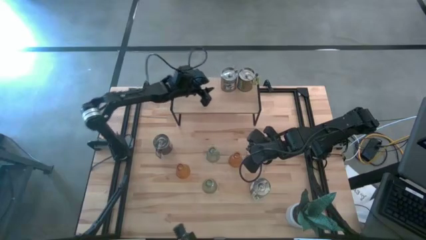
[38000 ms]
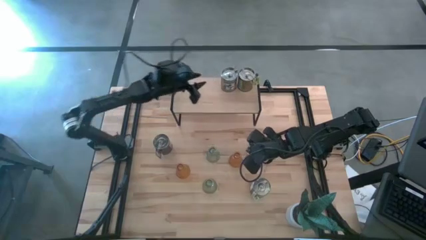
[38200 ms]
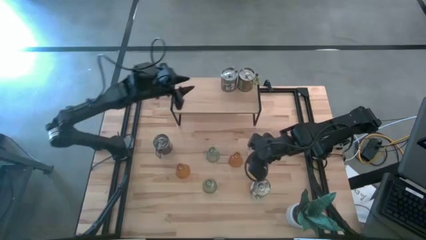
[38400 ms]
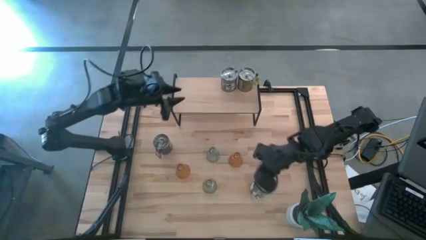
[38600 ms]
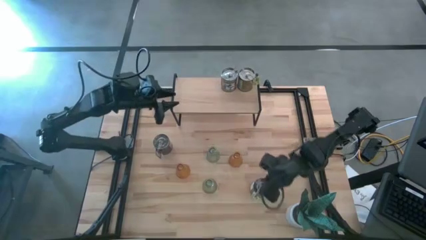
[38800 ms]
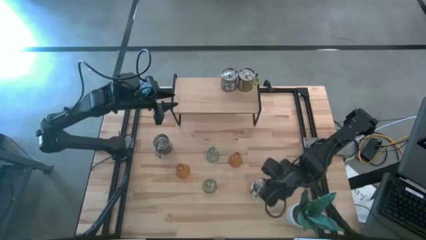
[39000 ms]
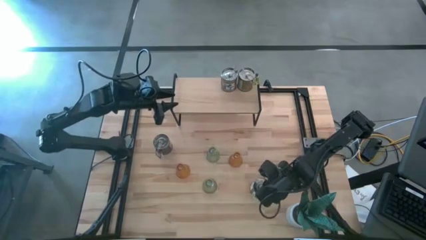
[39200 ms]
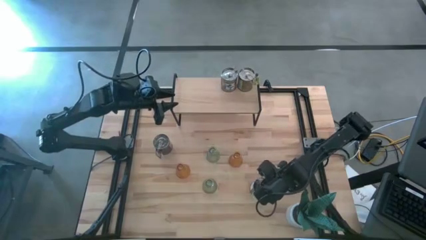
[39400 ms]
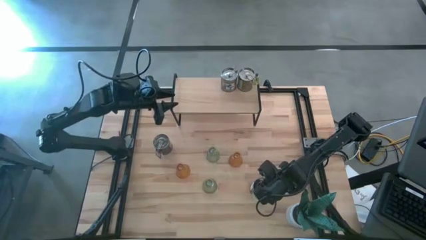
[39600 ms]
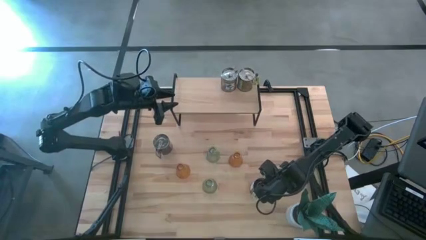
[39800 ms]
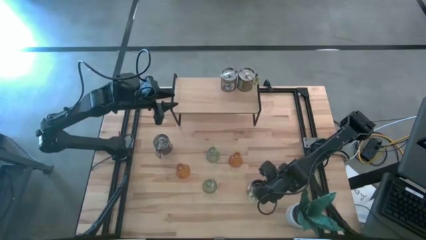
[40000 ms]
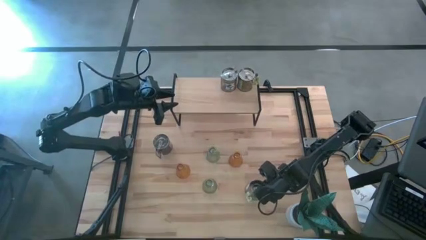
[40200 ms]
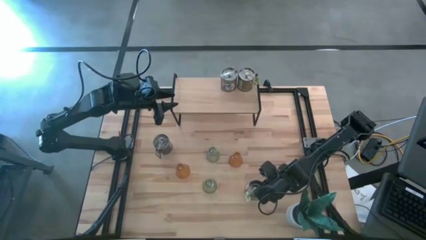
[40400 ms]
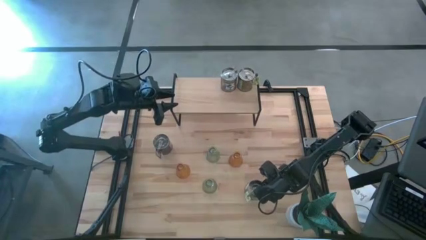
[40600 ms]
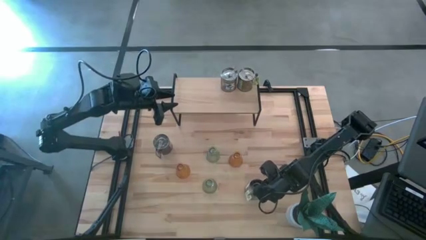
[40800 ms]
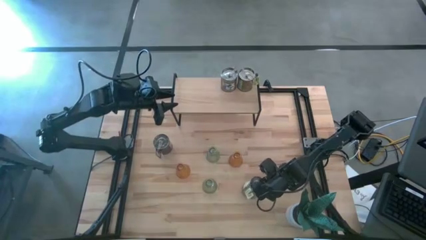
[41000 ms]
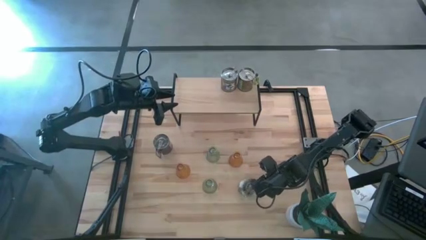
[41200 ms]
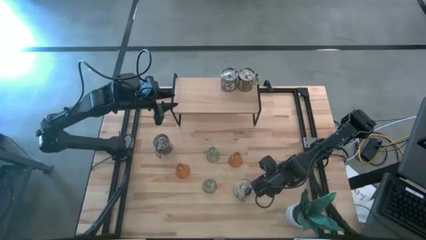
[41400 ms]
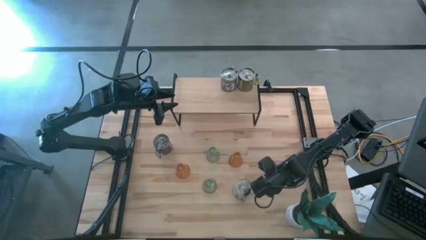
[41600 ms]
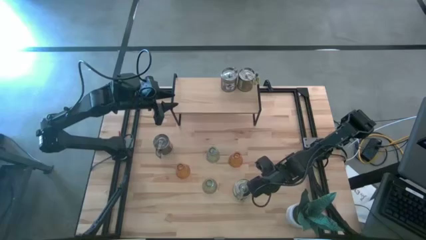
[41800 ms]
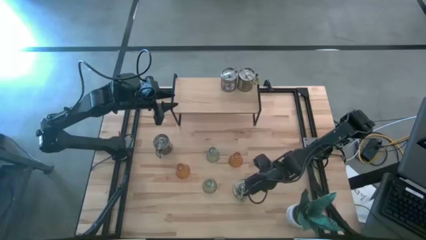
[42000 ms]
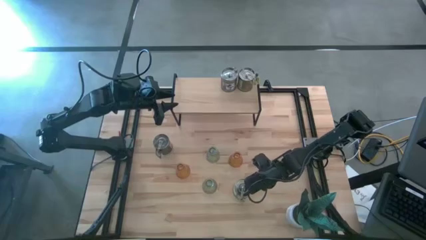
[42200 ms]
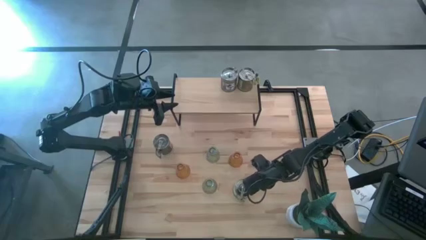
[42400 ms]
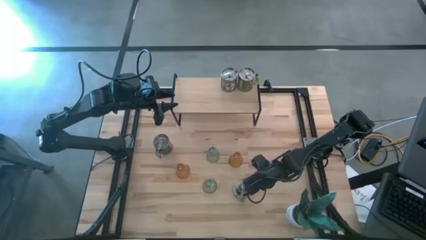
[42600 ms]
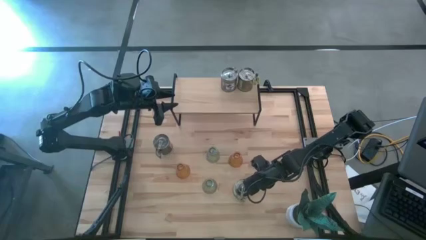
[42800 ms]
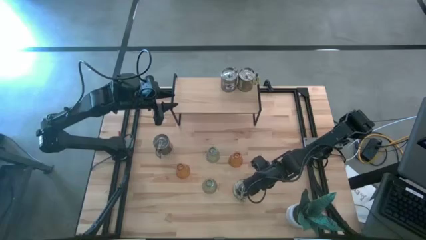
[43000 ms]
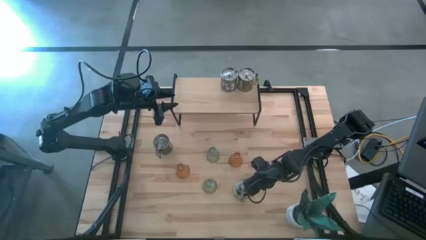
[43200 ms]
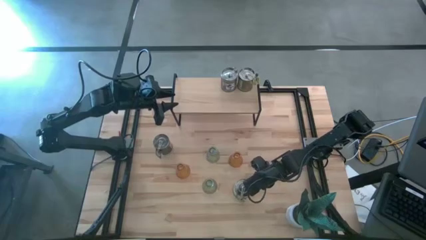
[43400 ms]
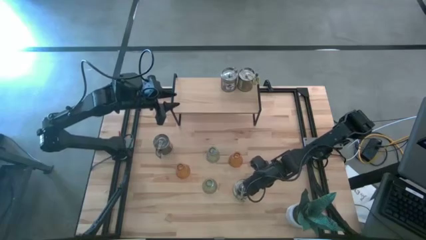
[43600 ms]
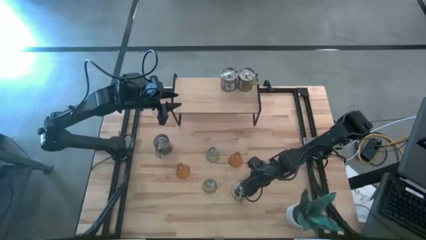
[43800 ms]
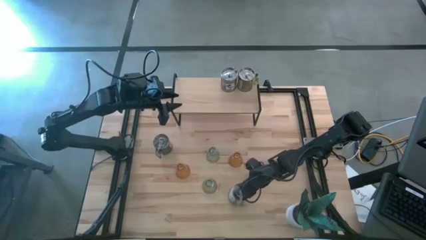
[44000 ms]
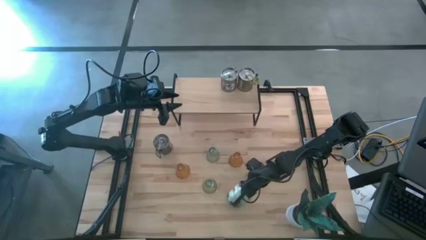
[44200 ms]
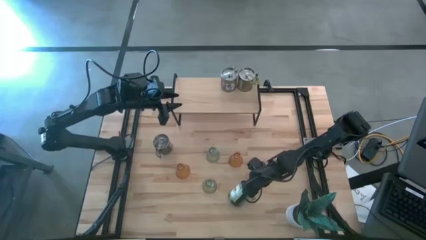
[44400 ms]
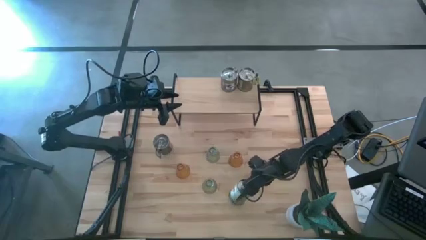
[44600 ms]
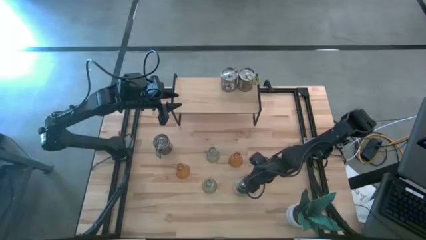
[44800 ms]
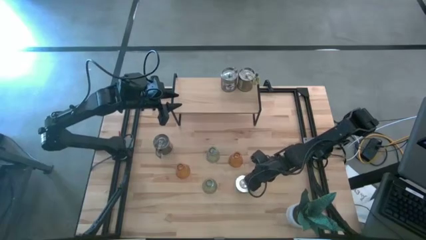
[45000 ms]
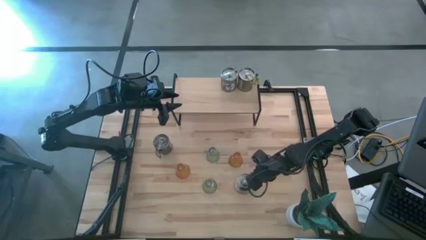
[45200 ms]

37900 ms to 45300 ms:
Task: Pick & Place candle stick holders
Put the silver scented candle on the shelf

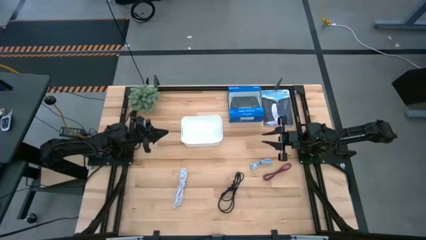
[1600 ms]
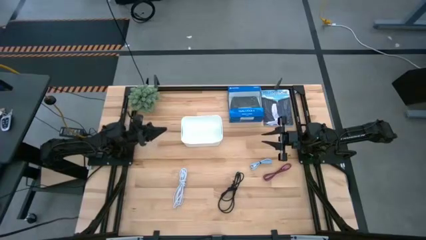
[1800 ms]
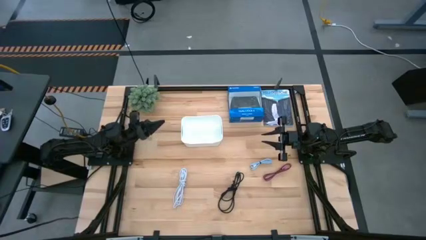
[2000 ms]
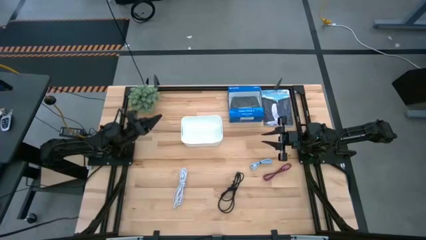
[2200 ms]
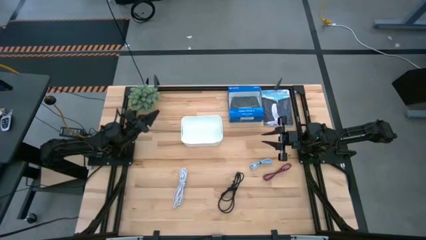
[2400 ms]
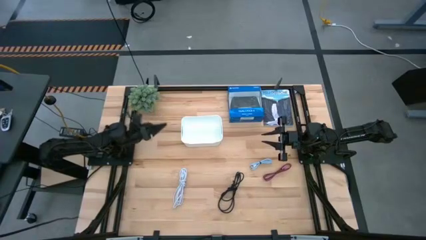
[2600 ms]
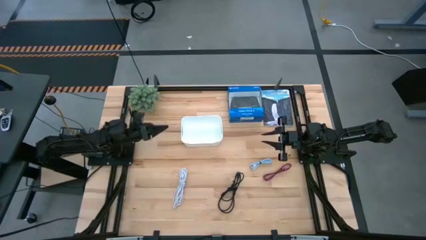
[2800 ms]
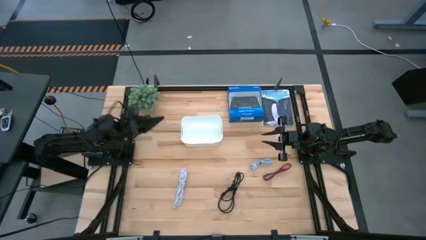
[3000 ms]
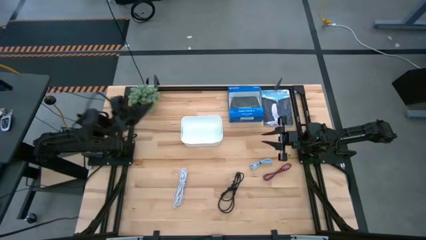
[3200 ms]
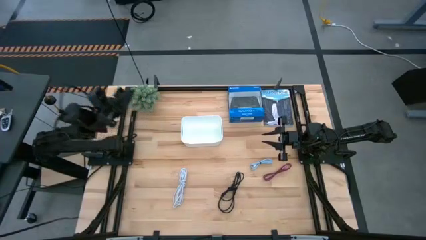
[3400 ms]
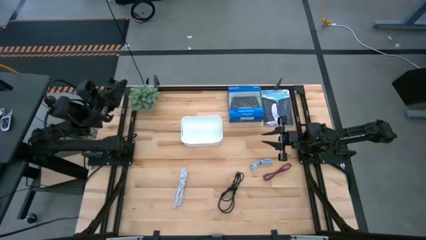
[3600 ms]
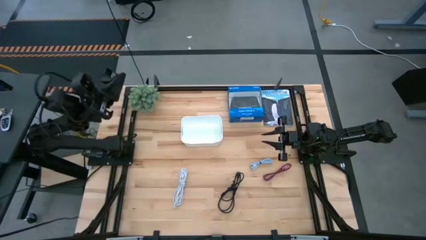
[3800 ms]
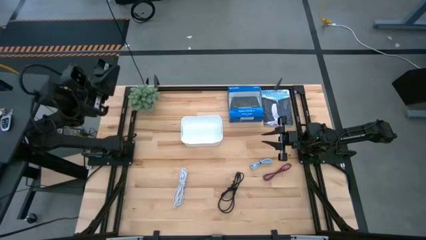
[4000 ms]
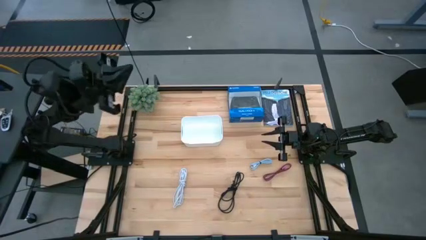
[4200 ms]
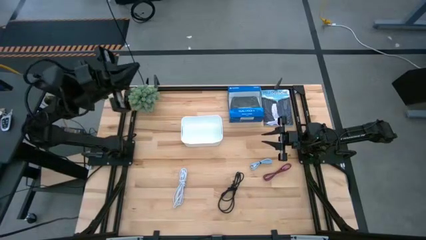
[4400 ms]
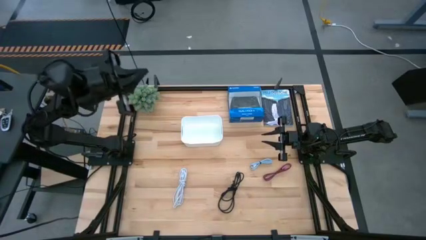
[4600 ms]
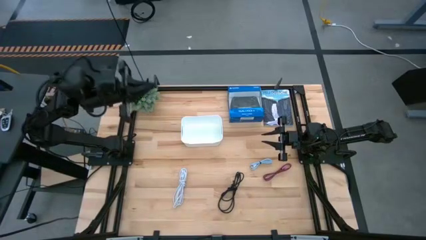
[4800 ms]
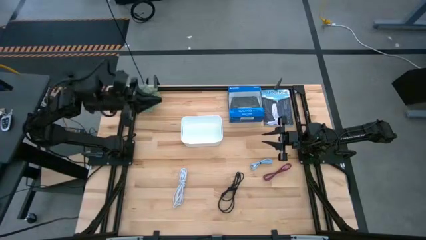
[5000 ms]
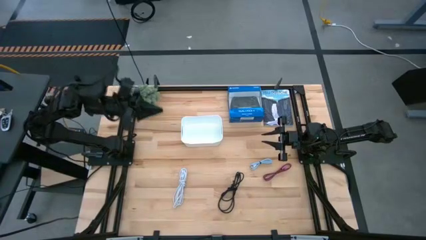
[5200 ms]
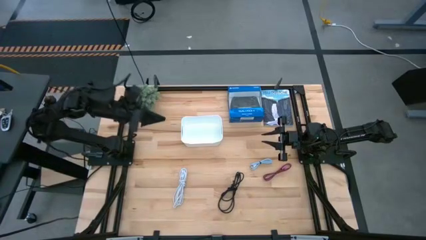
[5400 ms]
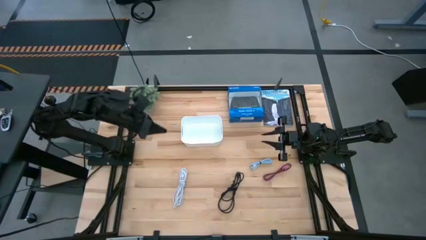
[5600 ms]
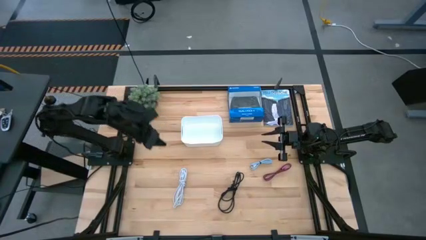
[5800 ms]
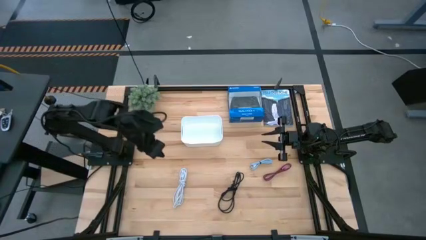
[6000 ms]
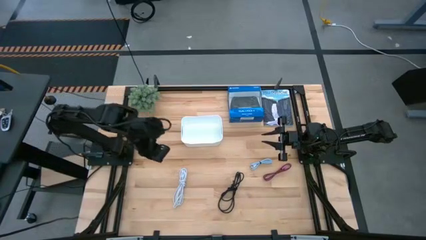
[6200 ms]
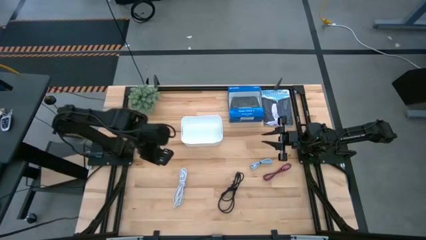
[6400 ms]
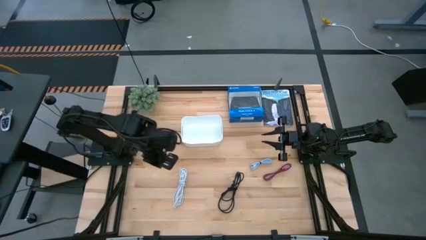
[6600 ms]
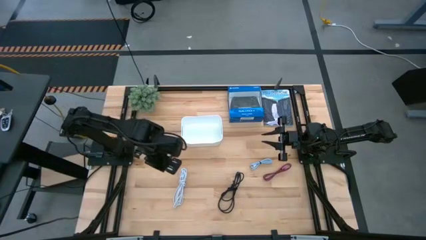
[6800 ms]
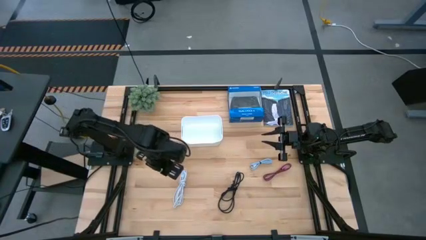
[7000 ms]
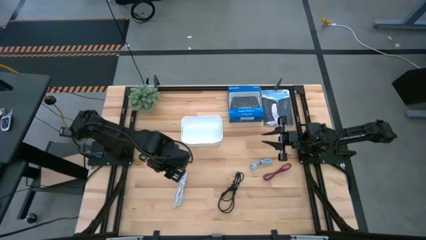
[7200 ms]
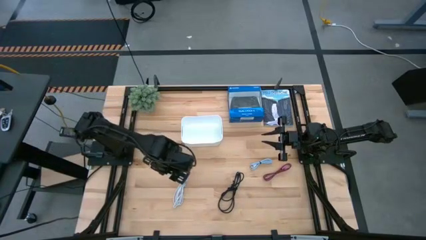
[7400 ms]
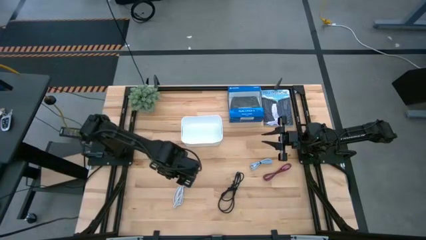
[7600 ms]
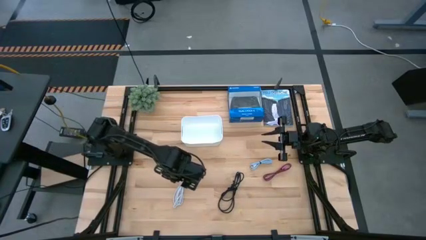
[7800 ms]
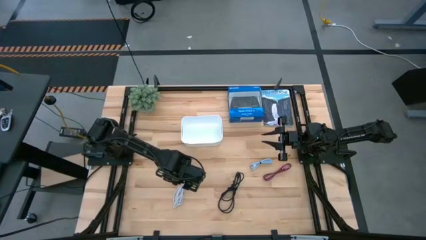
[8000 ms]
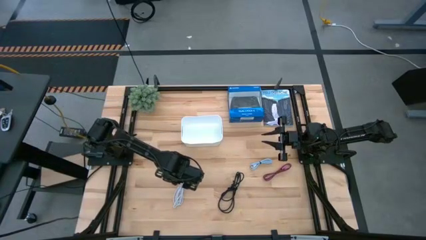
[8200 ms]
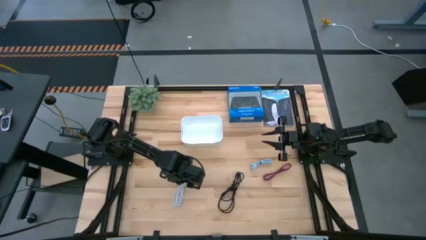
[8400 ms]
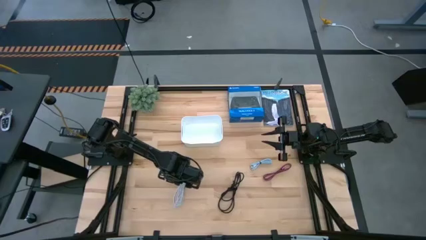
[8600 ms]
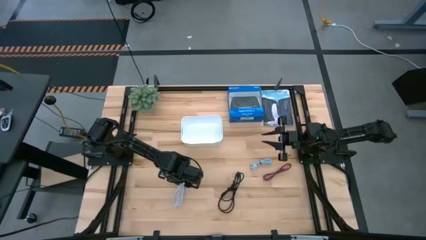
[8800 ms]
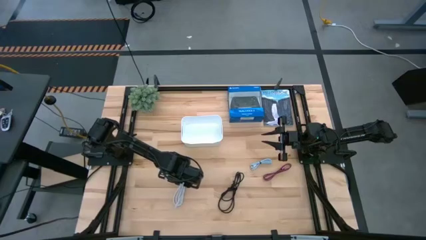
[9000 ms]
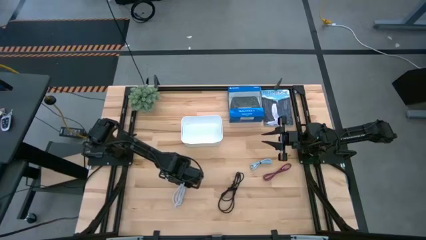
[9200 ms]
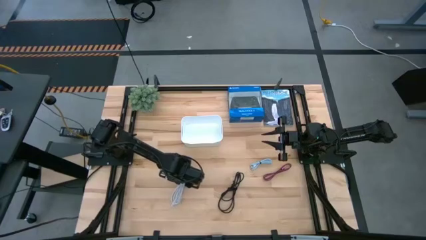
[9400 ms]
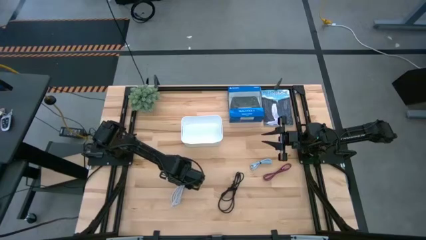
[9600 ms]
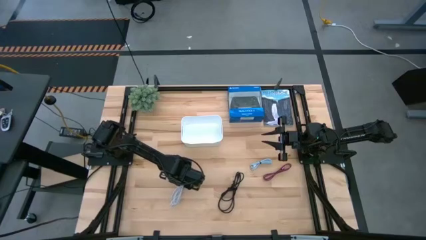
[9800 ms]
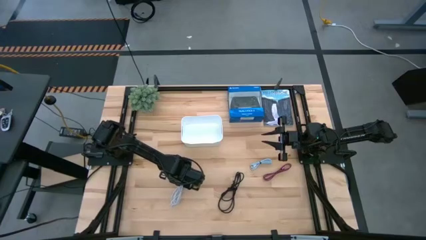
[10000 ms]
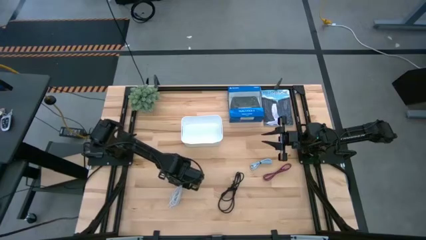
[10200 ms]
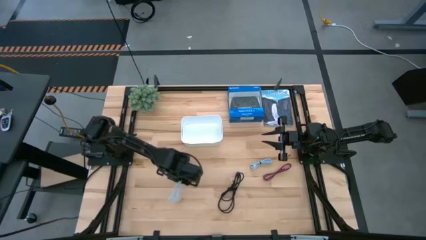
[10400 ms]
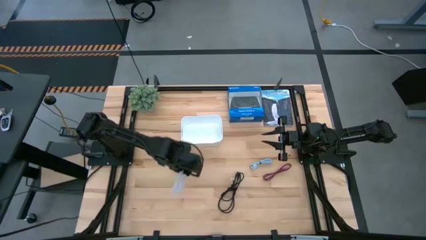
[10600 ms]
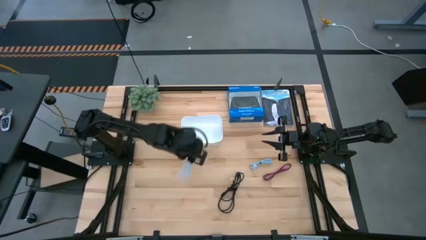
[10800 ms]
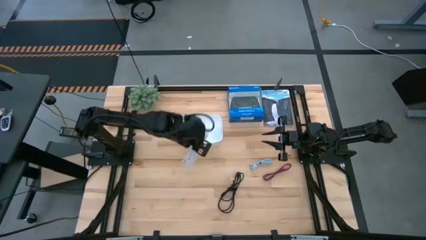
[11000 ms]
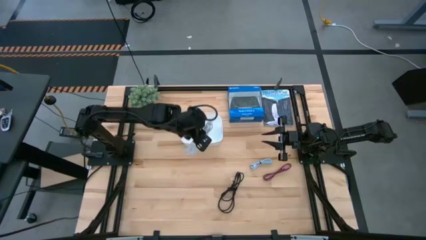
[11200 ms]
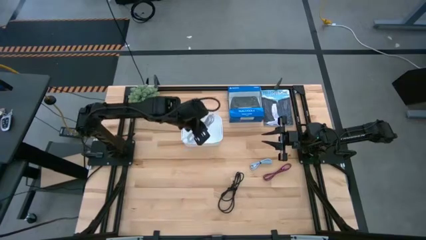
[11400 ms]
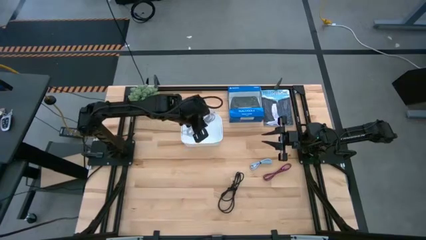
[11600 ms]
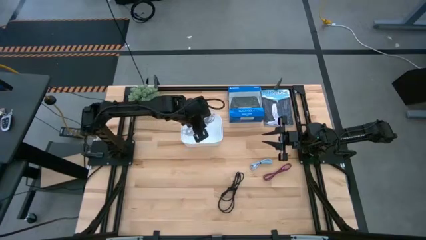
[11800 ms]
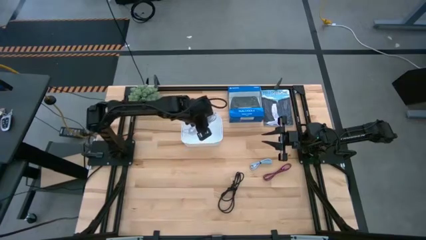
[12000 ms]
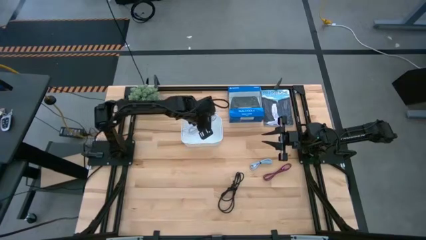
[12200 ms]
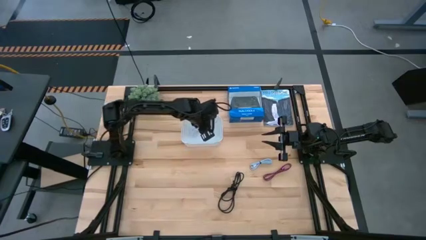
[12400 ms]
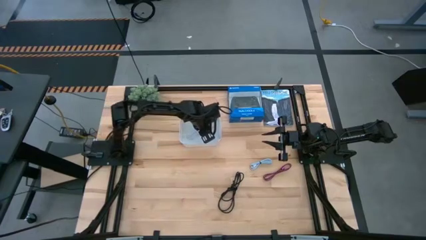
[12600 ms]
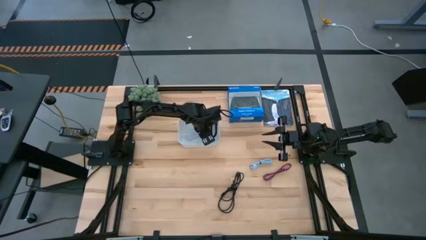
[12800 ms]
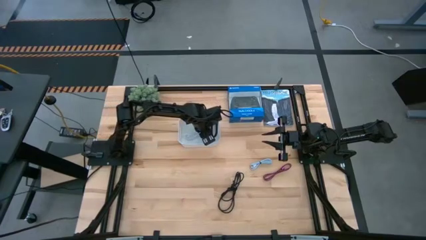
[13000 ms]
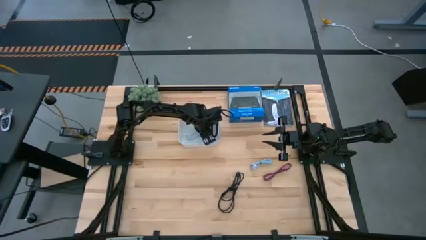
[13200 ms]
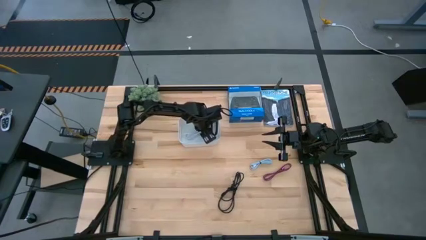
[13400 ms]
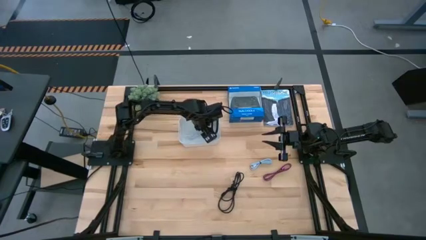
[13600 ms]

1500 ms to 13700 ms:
Task: Pick and place USB-C Cables
Put the white charger cable into the white bin
